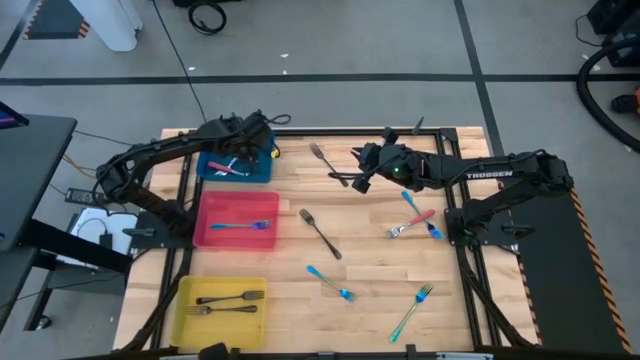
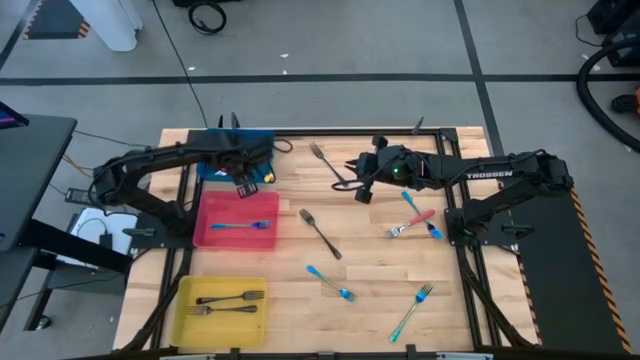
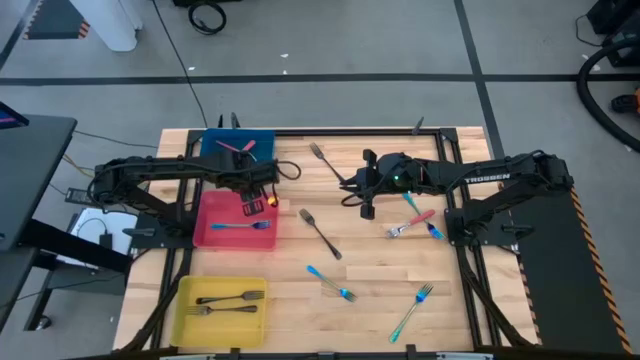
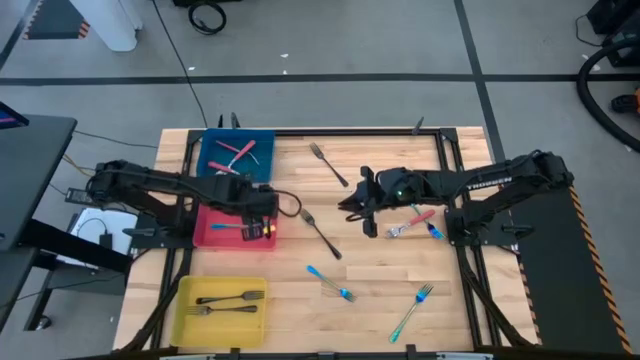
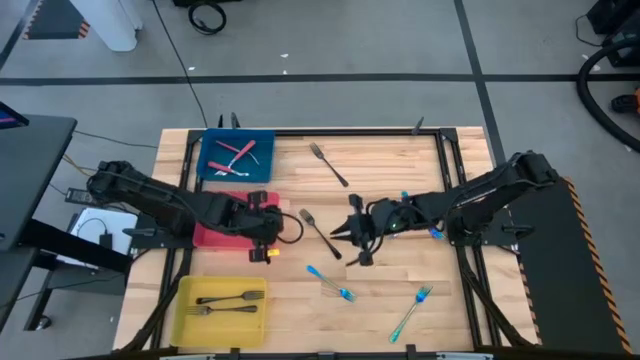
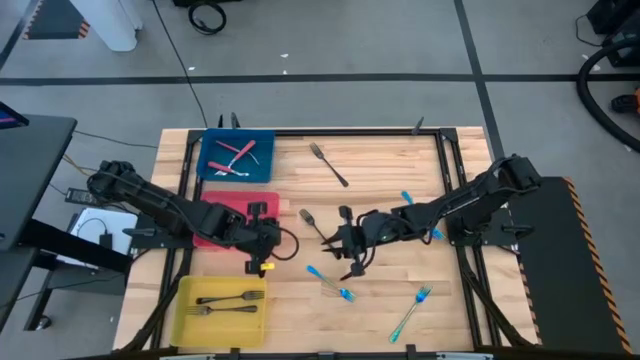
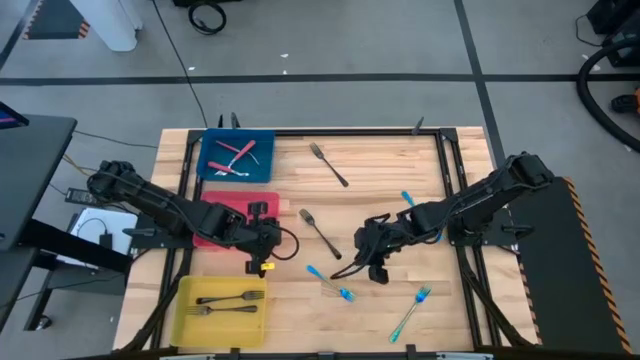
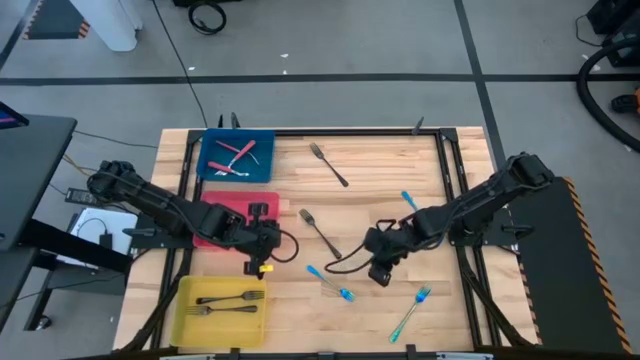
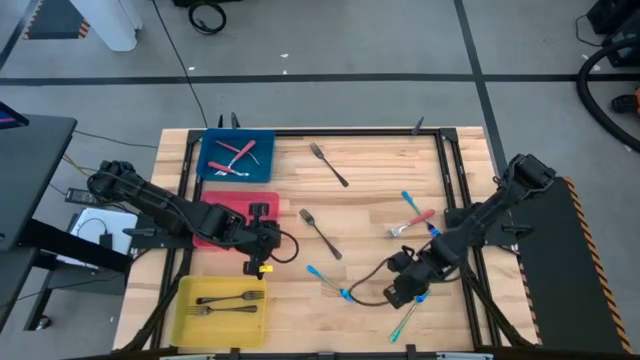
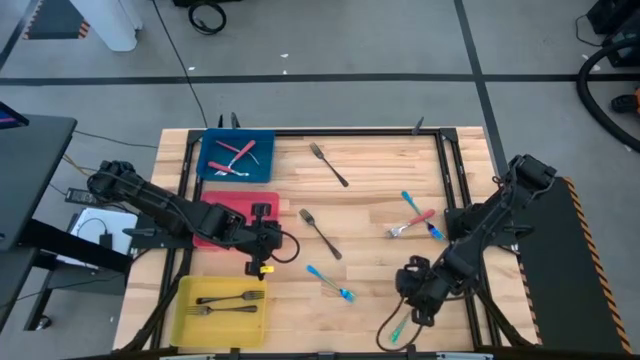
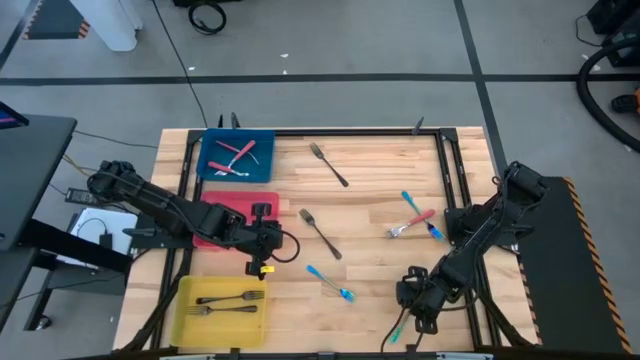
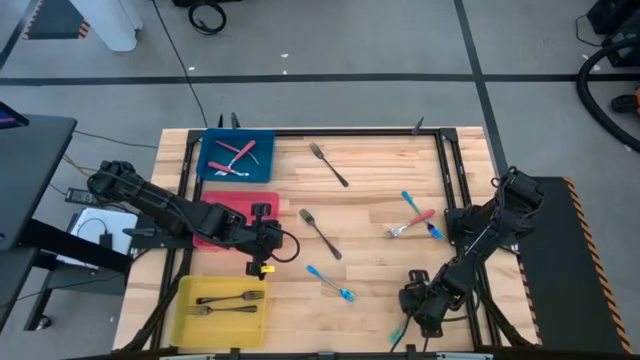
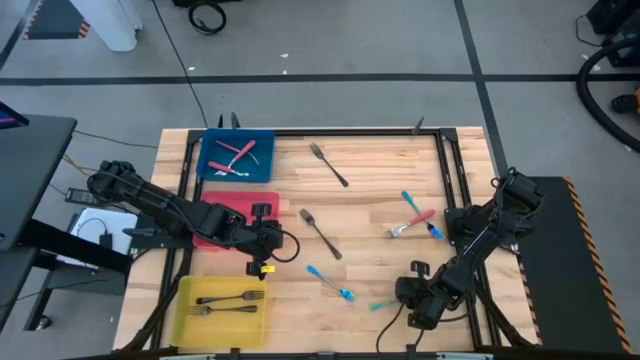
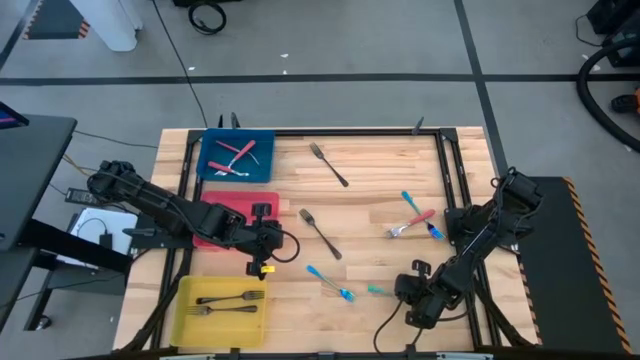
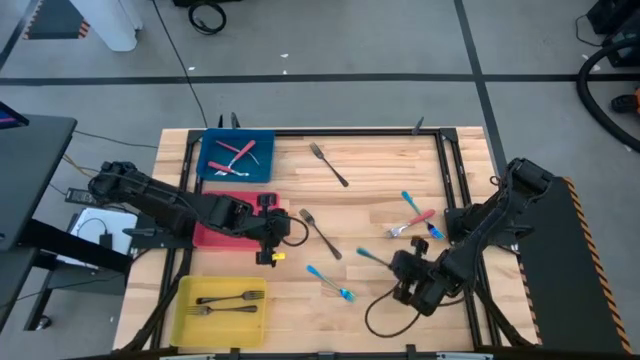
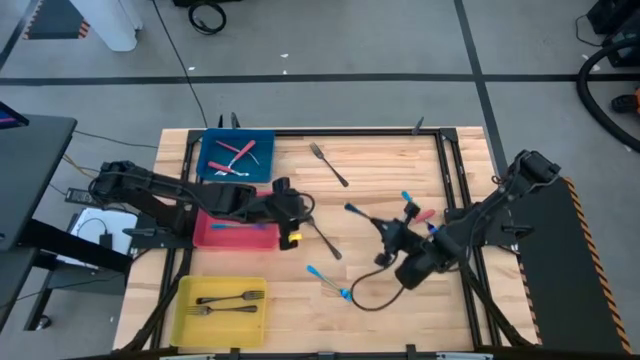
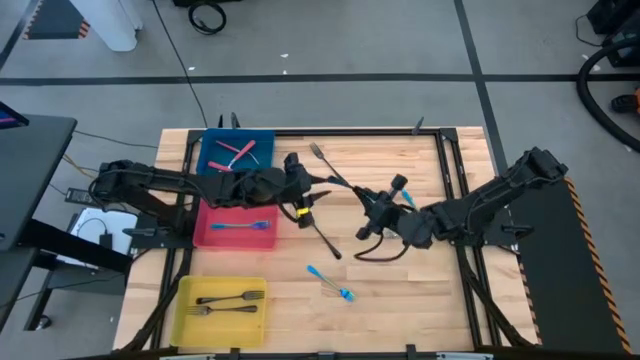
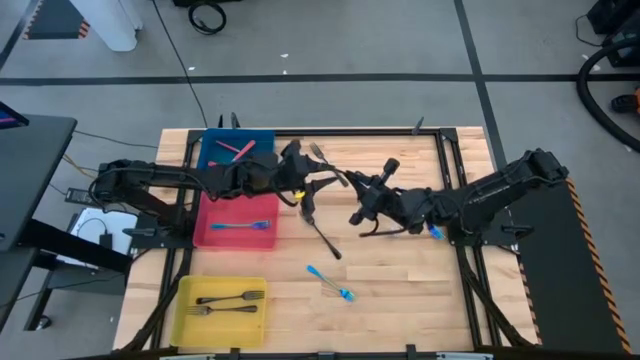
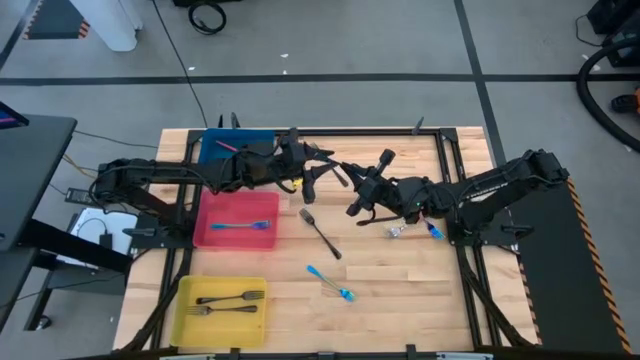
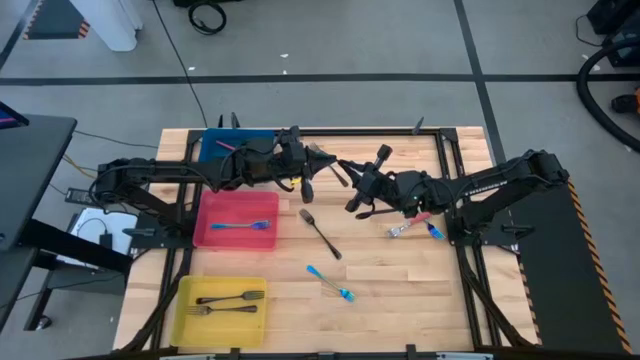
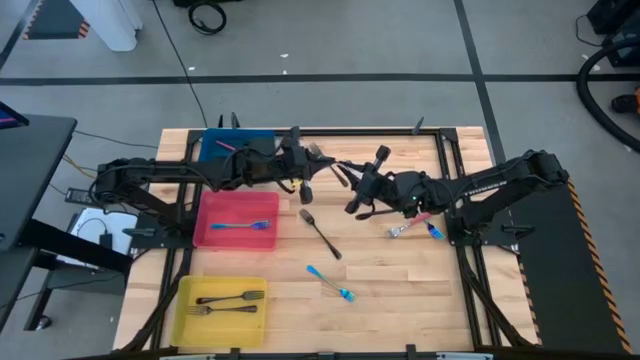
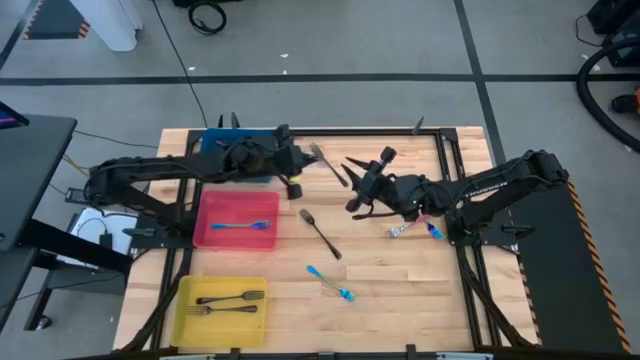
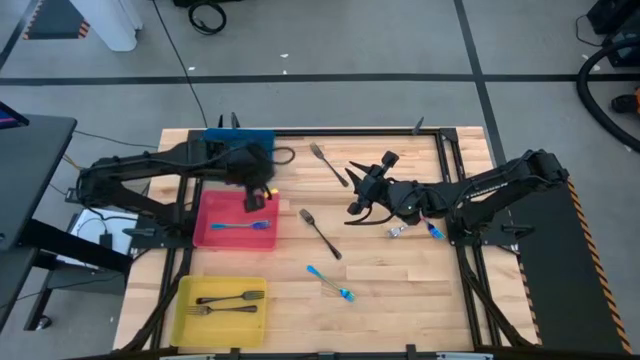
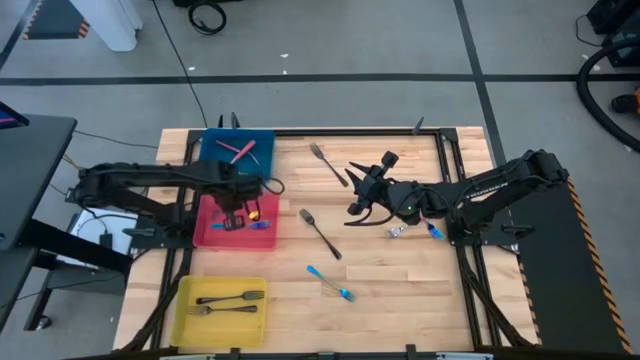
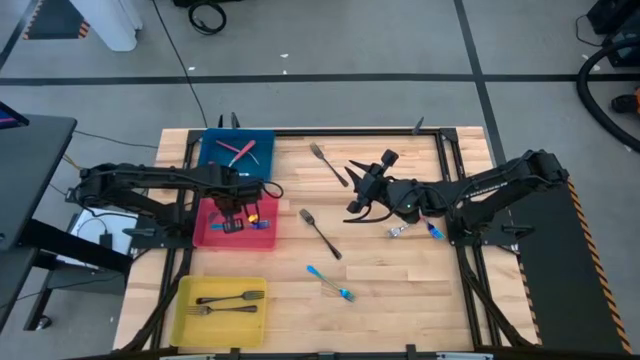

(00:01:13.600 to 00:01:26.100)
Task: Sort silverware by color (type)
Put the bottom right light blue fork into the red bin

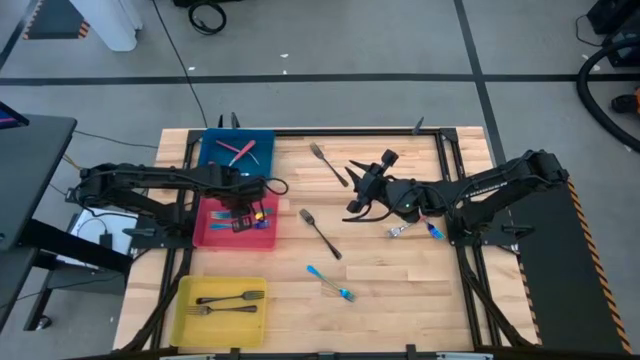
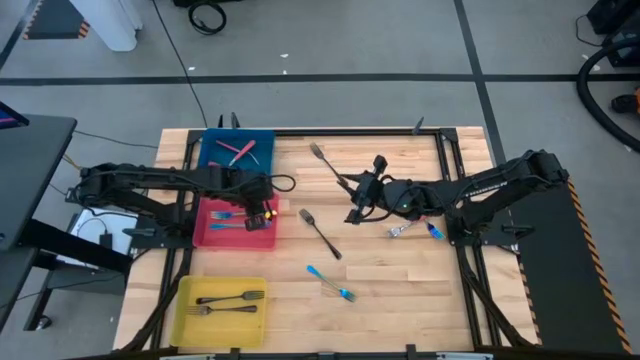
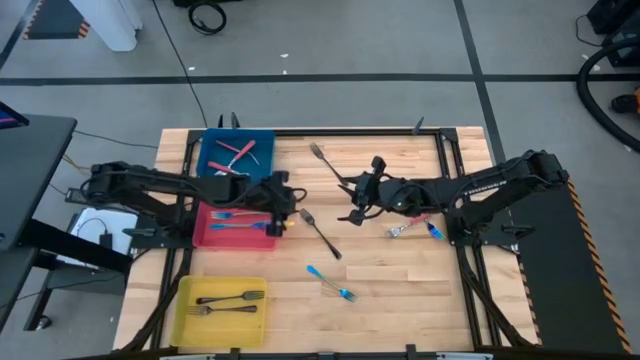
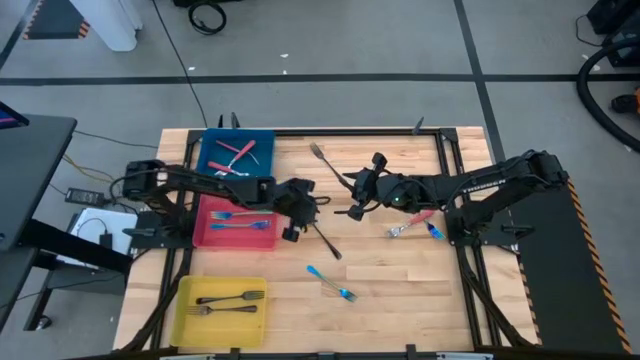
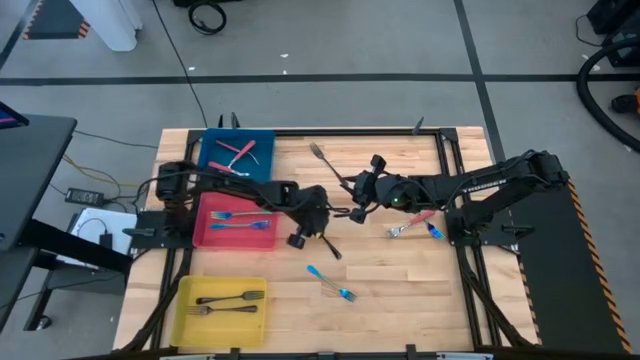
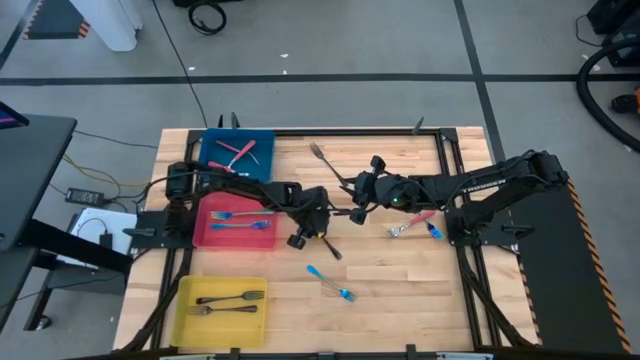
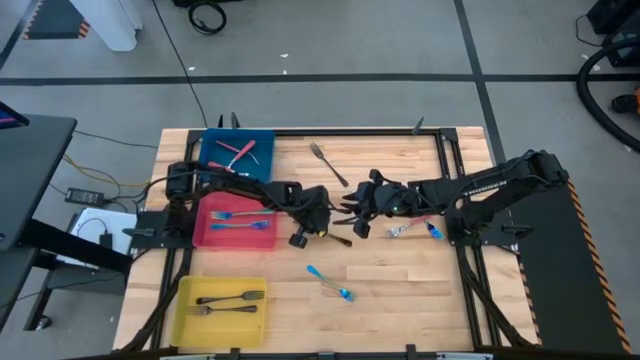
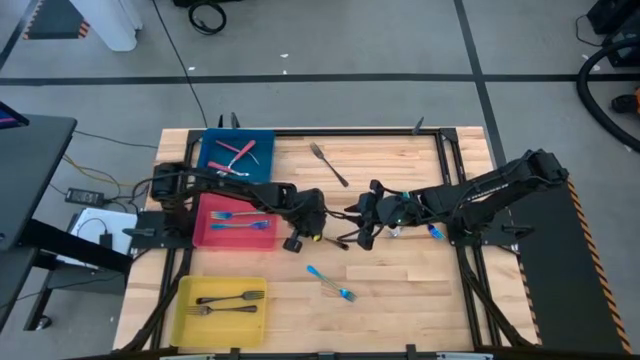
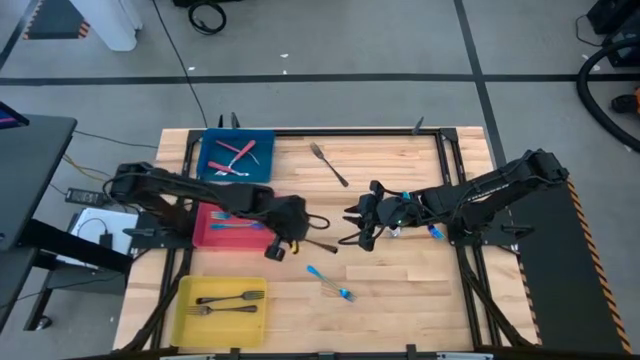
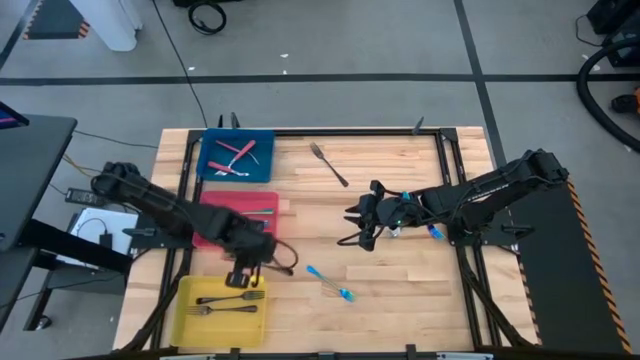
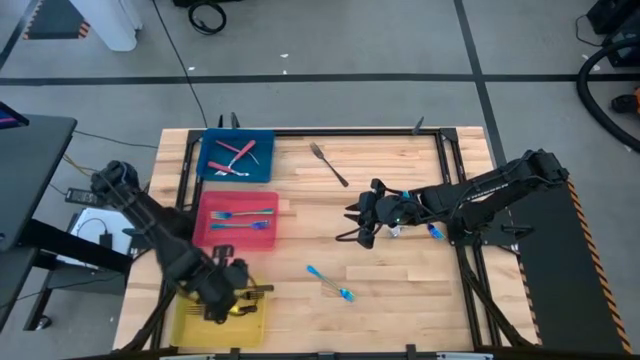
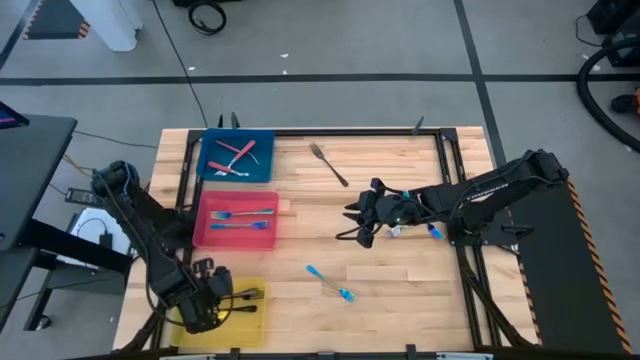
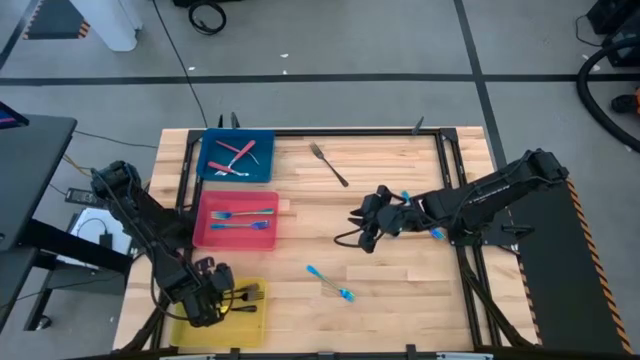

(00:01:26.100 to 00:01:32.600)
Put the bottom black fork into the yellow bin

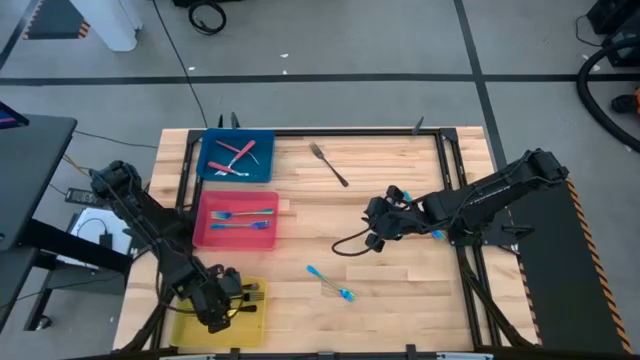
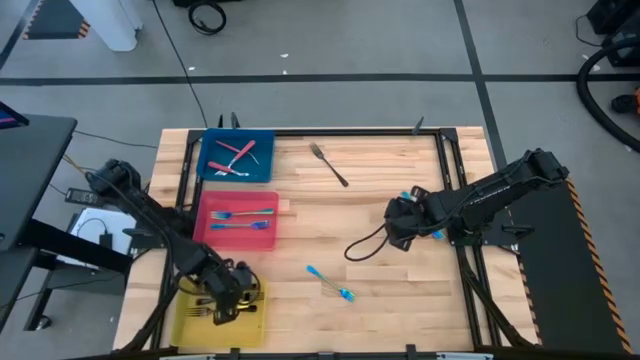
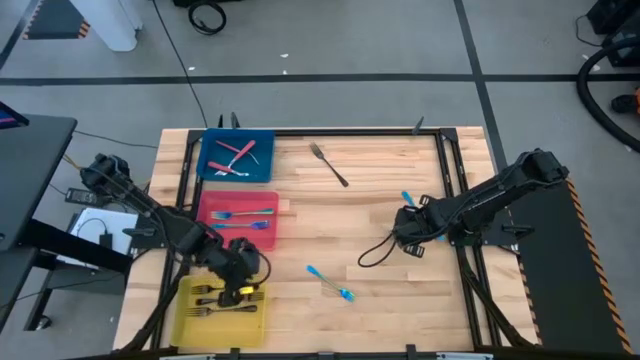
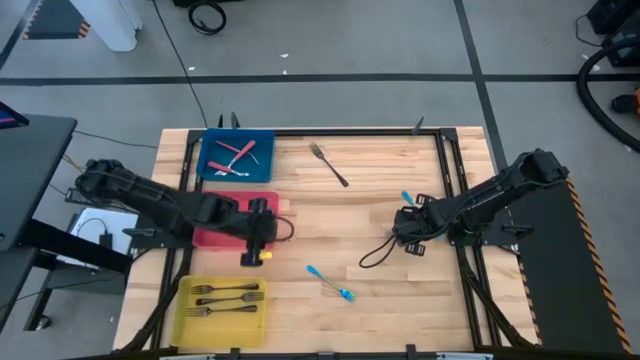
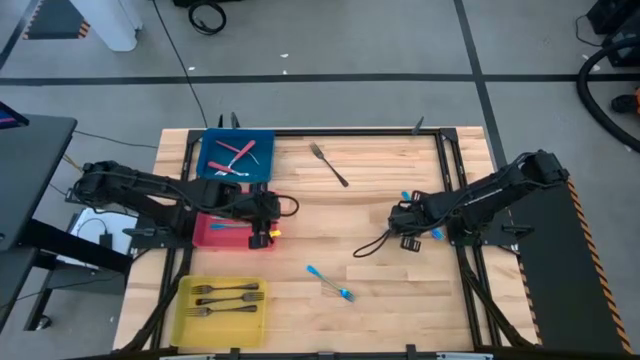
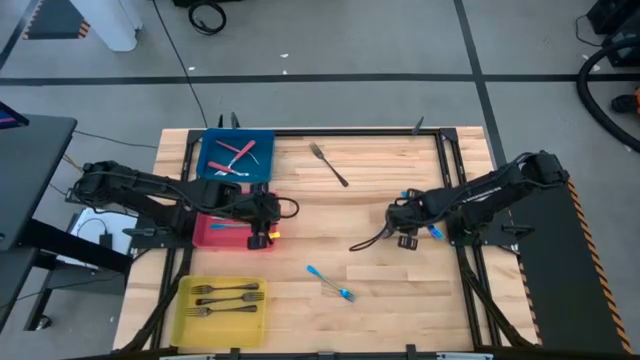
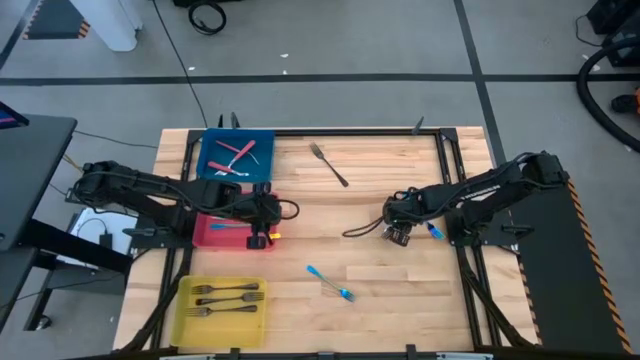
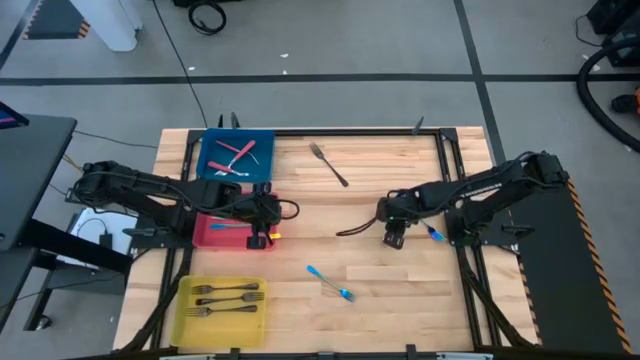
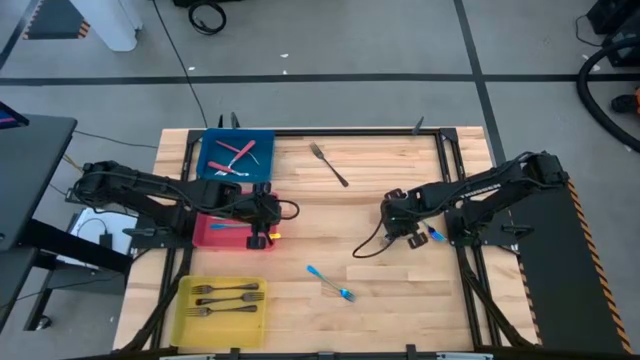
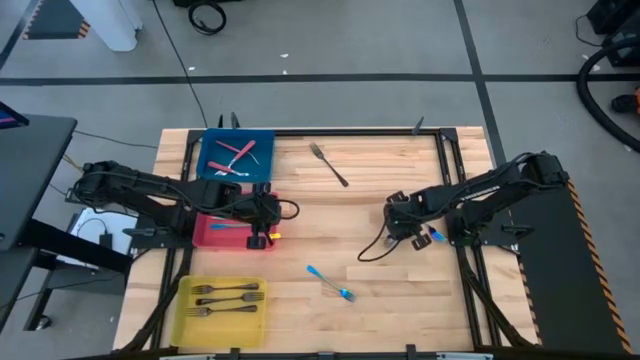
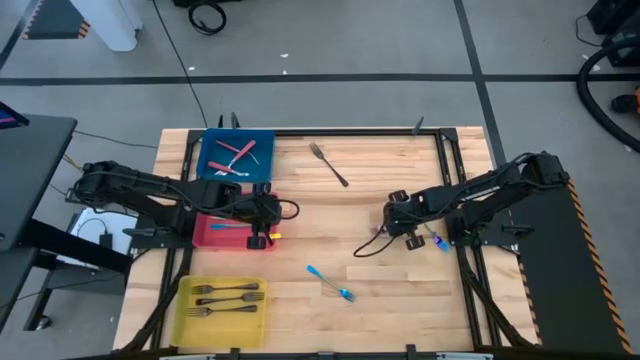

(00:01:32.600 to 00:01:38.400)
Put the pink fork into the blue bin
